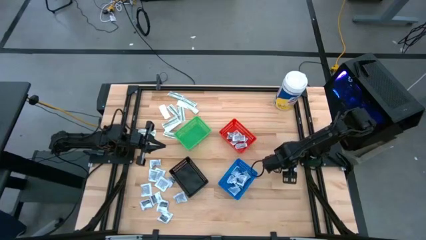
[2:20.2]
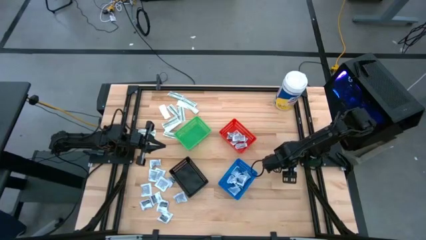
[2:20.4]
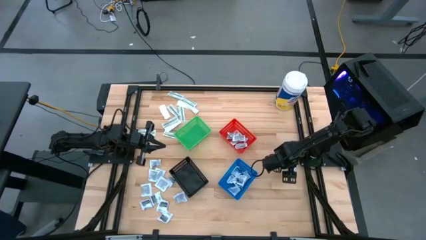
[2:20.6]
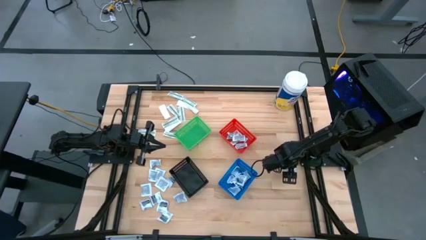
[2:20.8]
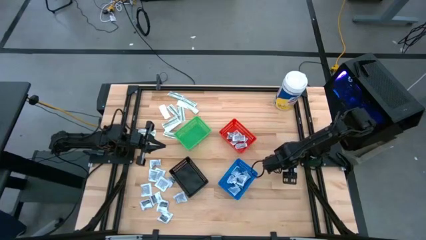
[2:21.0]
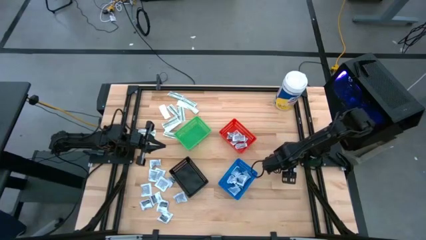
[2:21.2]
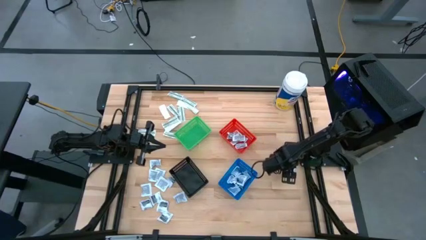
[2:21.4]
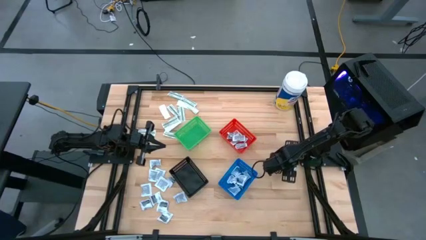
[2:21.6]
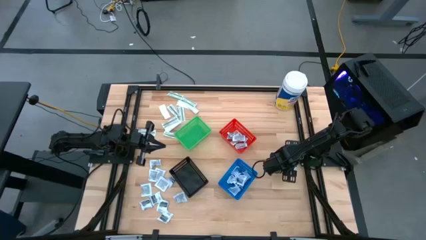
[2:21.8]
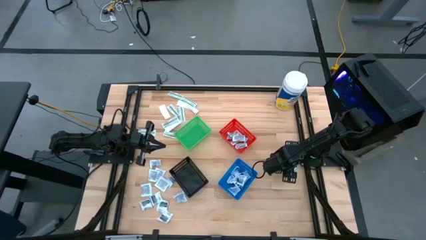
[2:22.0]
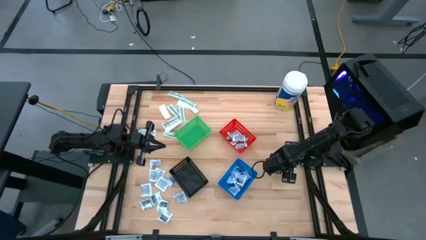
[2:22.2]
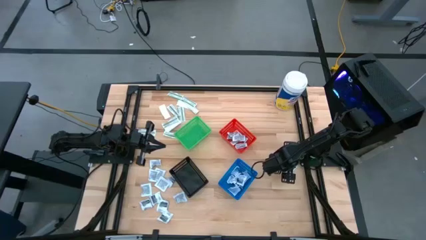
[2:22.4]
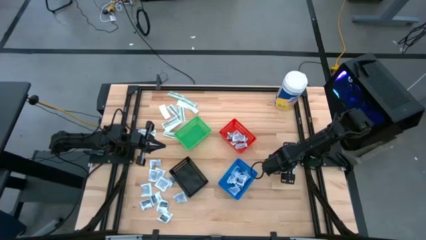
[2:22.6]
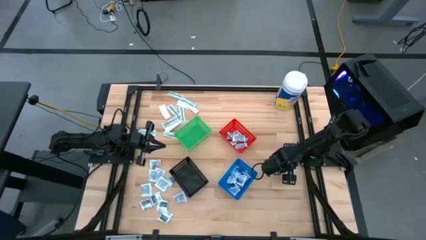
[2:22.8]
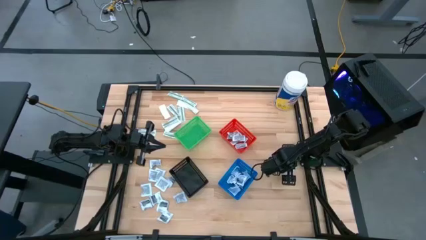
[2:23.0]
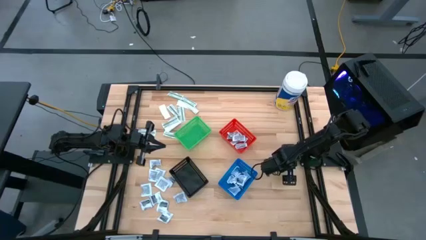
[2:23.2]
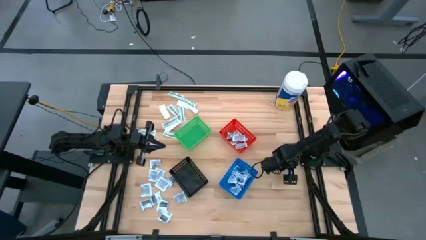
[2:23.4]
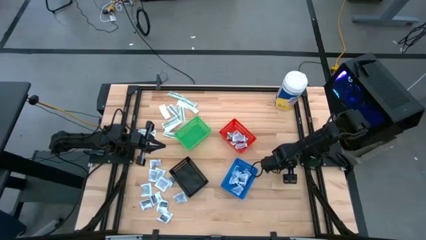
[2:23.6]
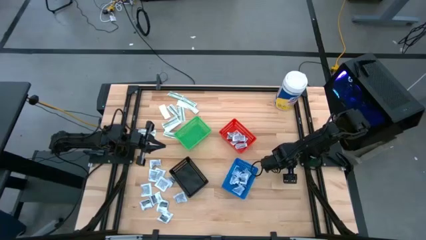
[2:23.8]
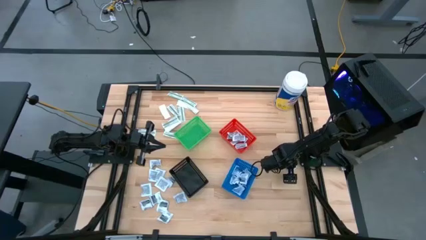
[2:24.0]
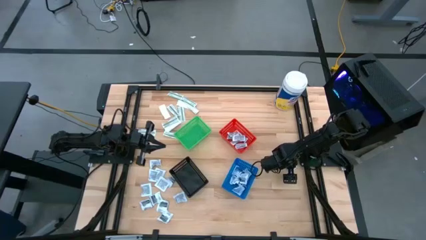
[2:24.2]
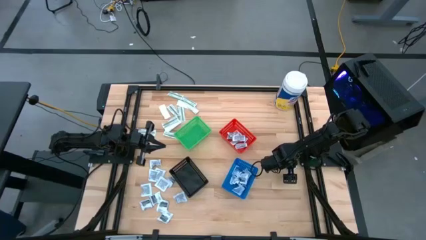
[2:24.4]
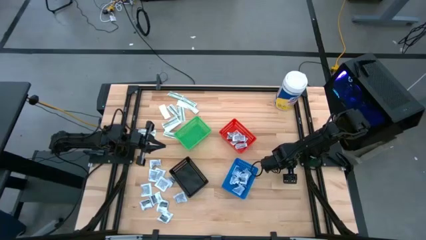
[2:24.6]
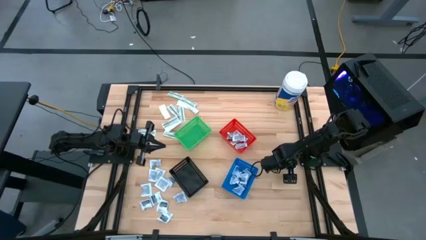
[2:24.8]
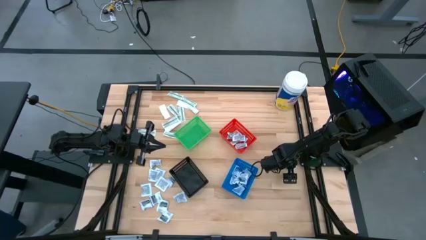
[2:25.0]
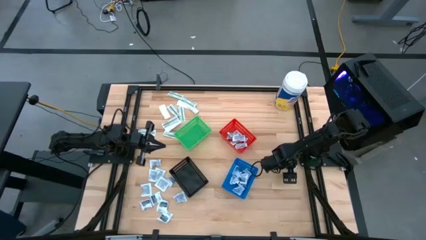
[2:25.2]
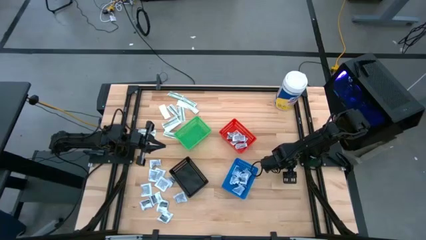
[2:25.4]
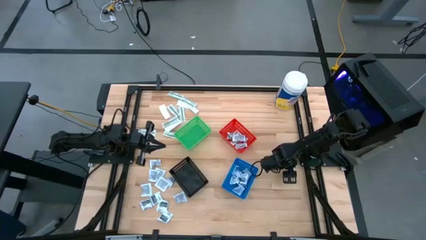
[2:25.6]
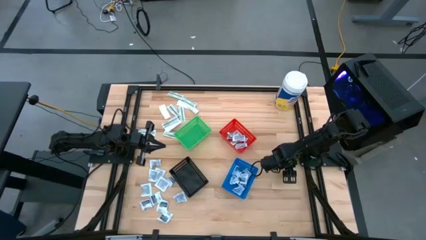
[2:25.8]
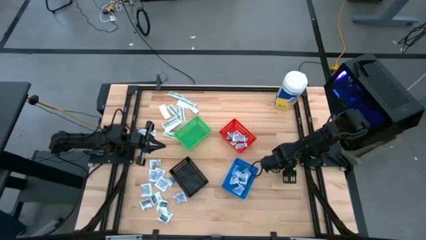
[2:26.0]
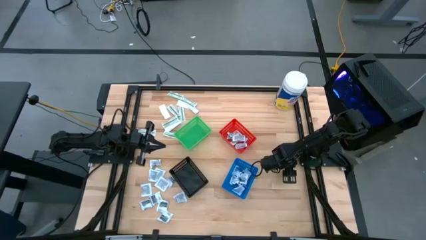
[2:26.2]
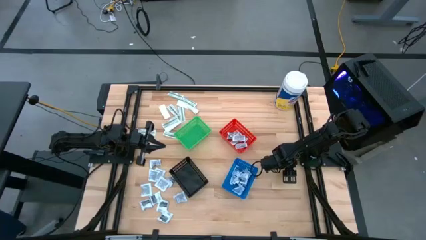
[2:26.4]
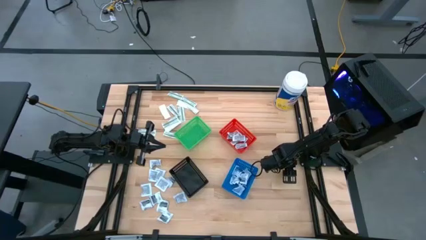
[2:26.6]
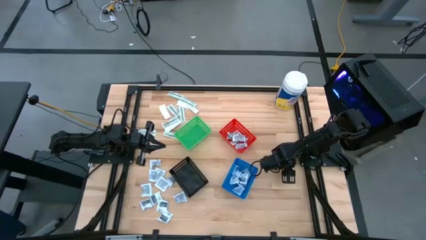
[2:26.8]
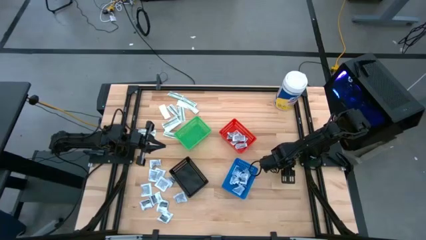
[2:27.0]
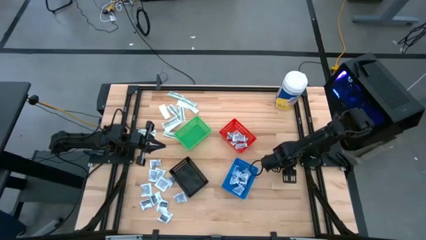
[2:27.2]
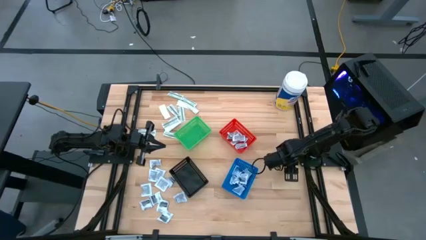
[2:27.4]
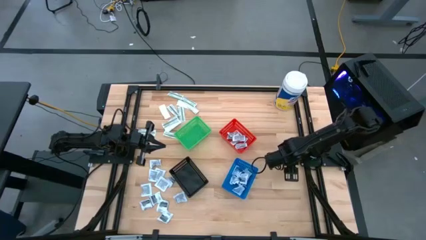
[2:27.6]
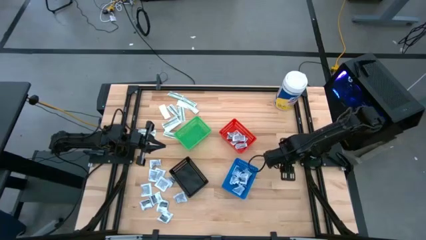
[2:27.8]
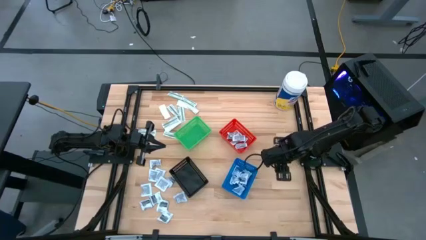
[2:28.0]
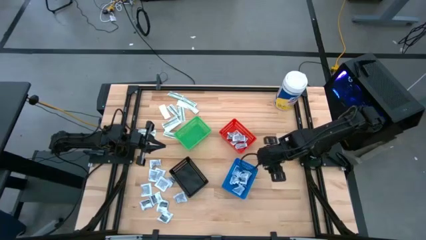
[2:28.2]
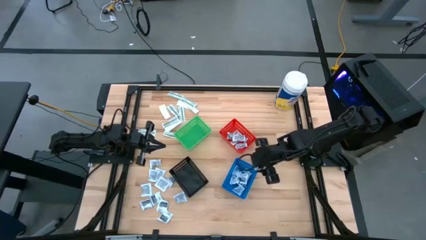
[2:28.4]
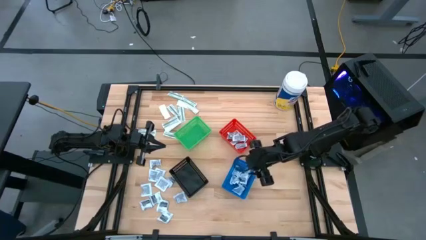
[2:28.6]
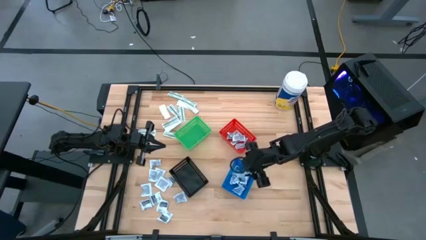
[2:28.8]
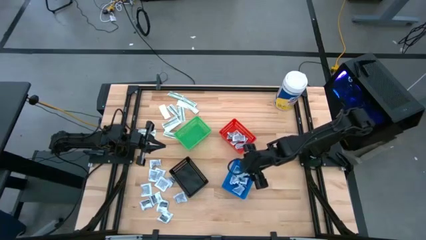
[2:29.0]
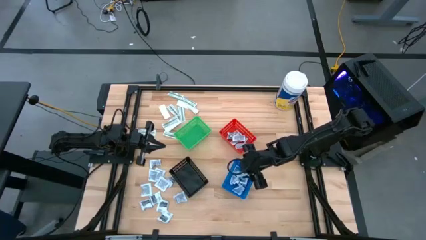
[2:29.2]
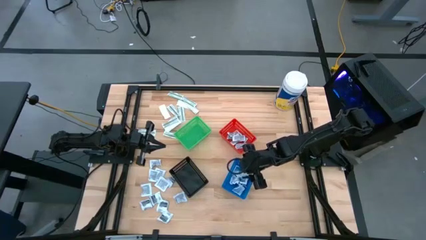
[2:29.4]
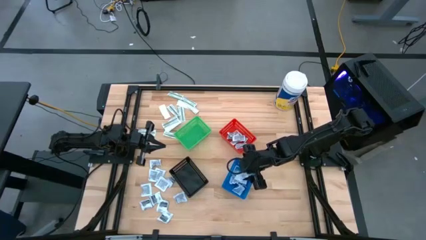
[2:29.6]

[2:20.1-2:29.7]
Task: Pick & Place First Aid Supplies
Put the blue alcohol pad into the blue bin
